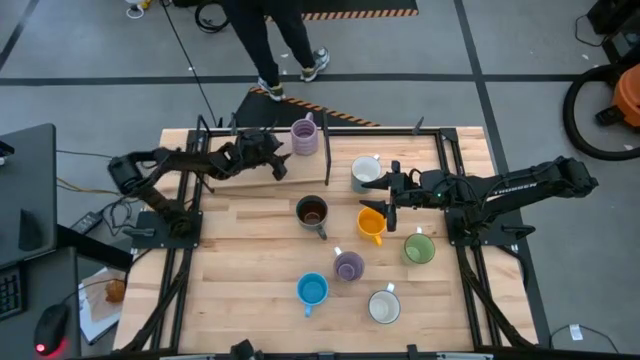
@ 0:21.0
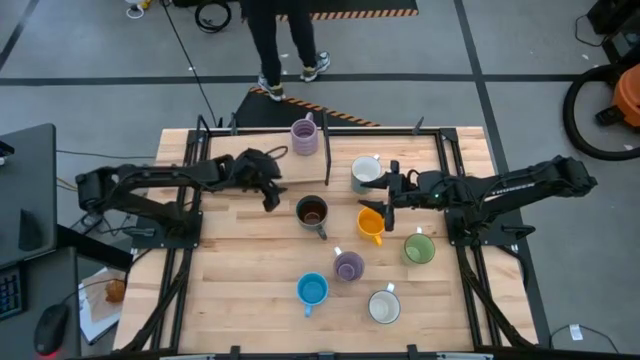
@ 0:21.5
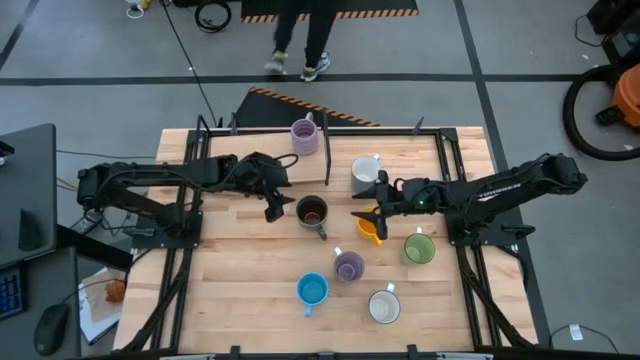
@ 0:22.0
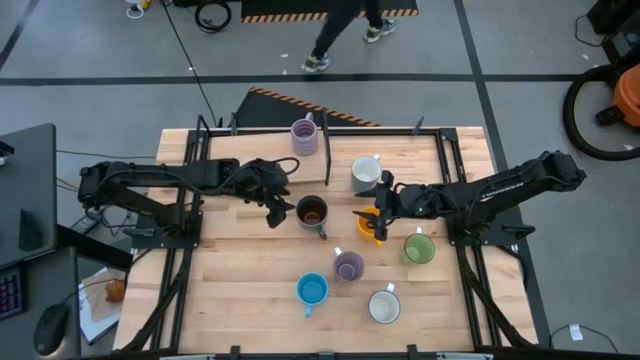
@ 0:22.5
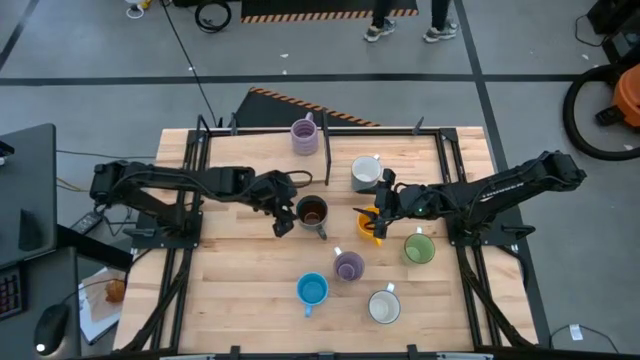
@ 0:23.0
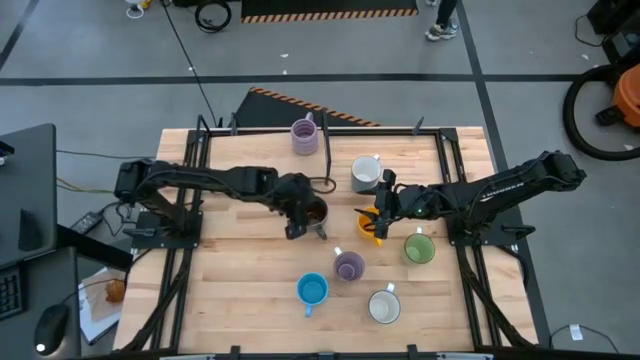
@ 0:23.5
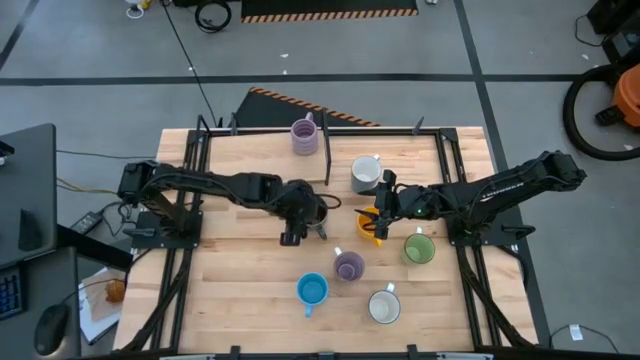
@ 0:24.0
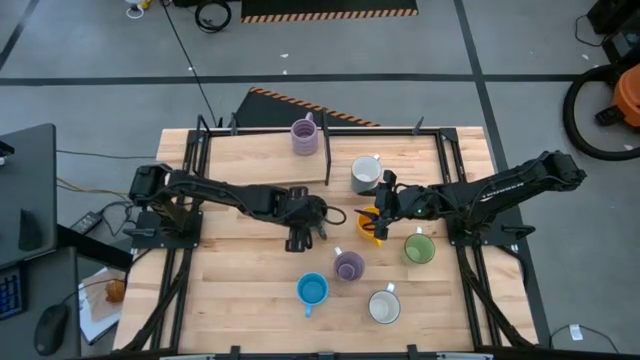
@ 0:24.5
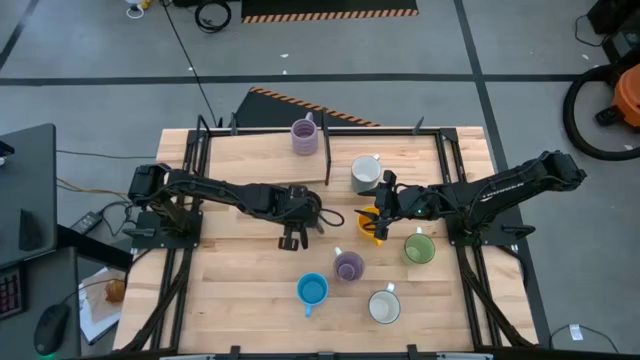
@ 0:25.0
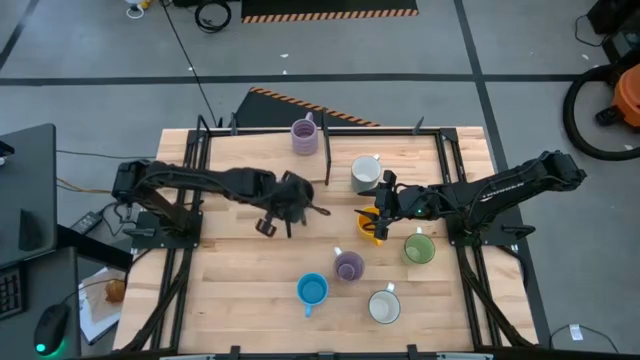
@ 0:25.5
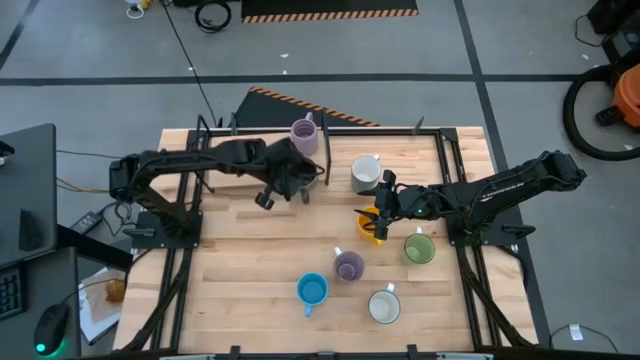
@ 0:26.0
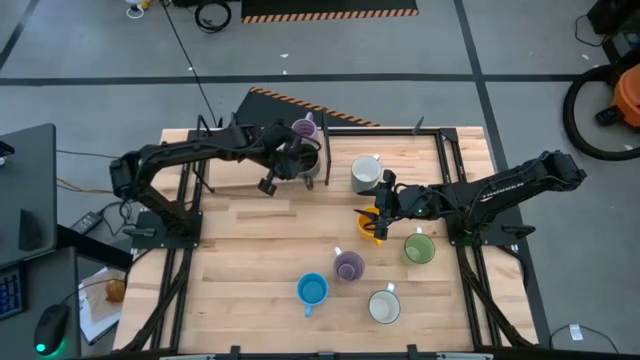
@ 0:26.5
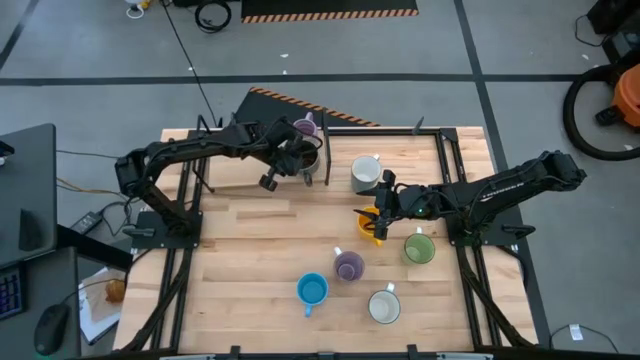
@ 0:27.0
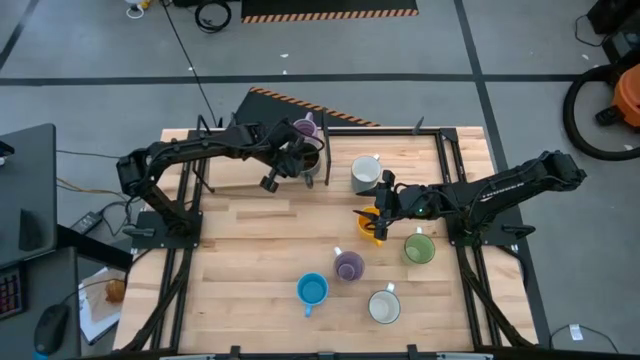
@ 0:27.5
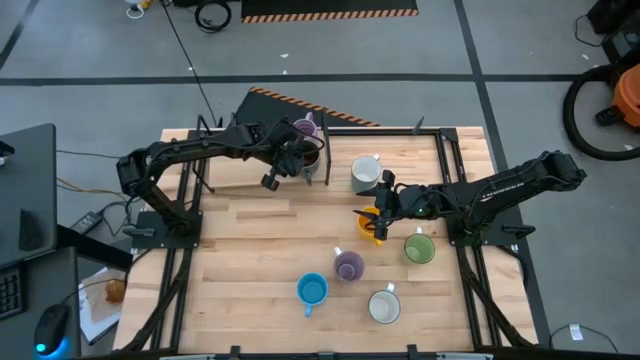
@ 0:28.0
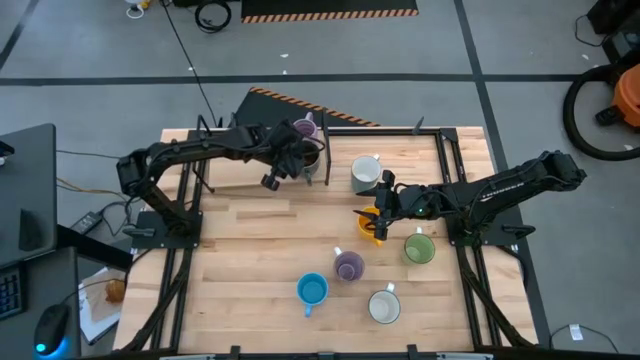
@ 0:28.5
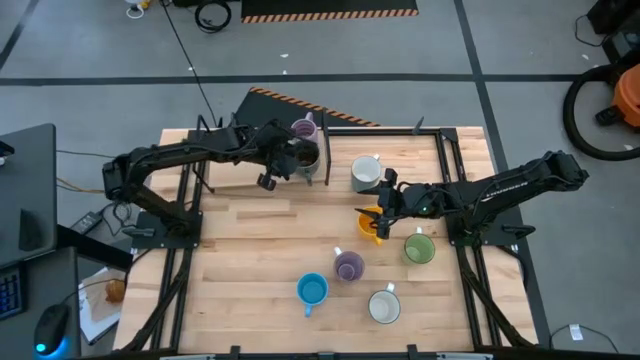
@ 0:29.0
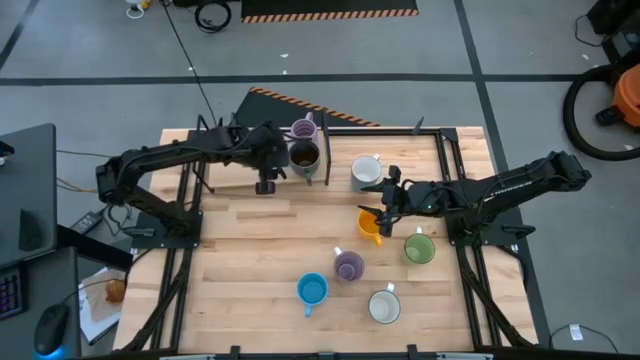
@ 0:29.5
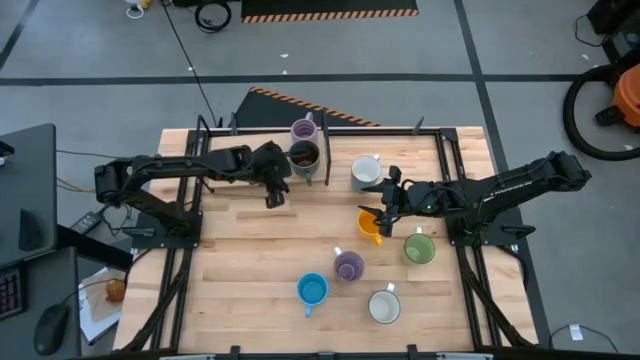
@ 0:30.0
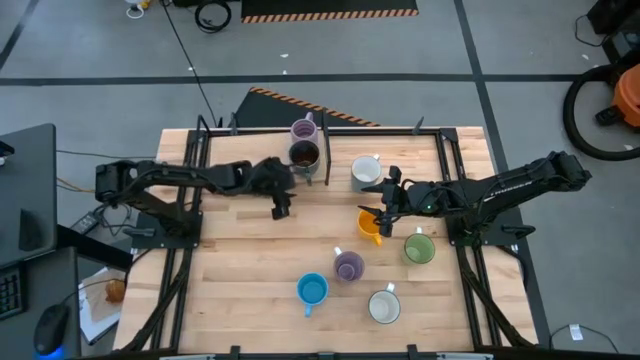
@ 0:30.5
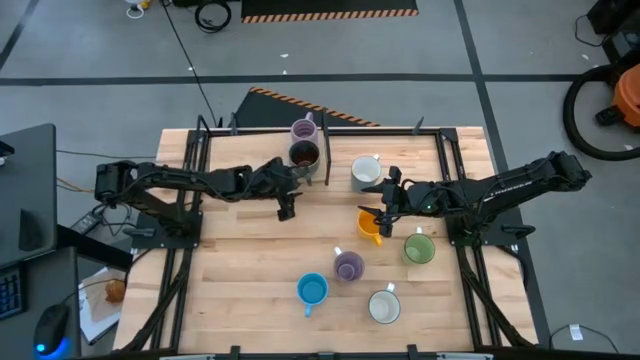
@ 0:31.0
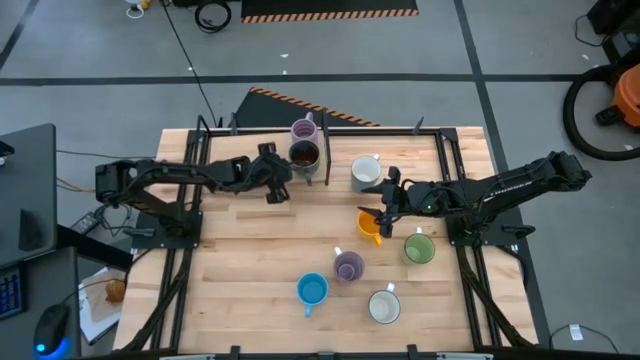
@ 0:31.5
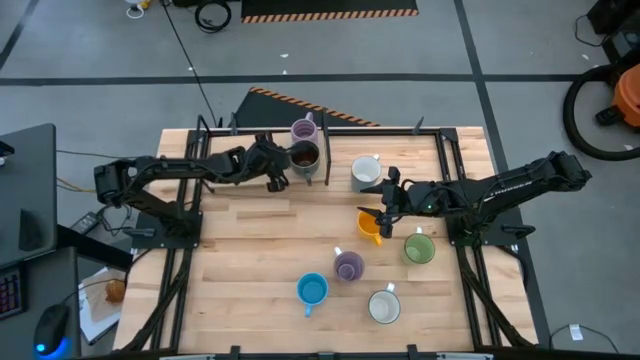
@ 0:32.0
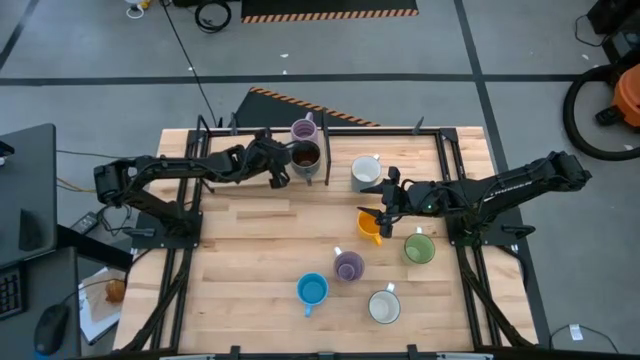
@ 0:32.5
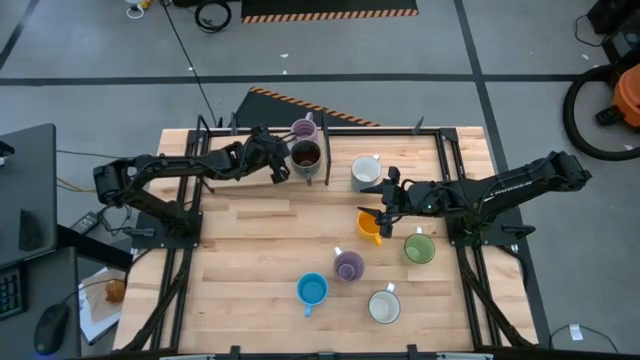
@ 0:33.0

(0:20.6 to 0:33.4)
Task: Place coffee mugs
Put the dark blue patterned mug on the shelf
